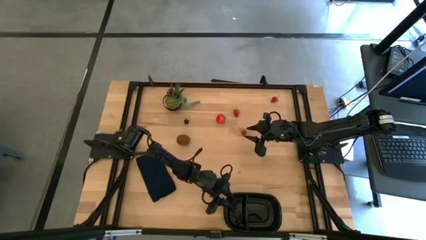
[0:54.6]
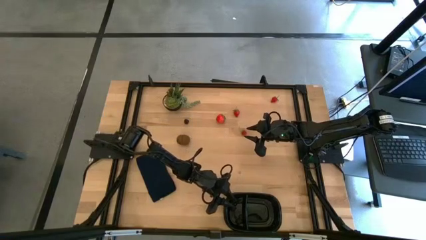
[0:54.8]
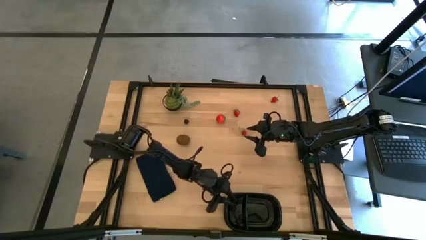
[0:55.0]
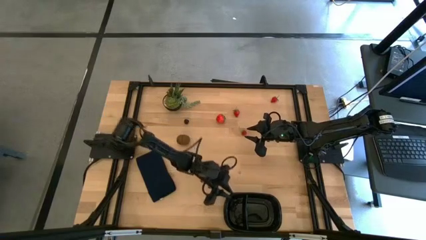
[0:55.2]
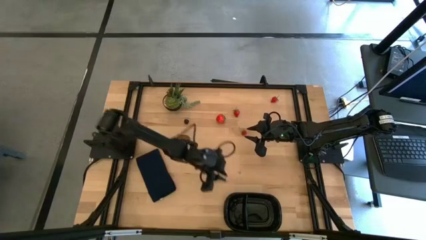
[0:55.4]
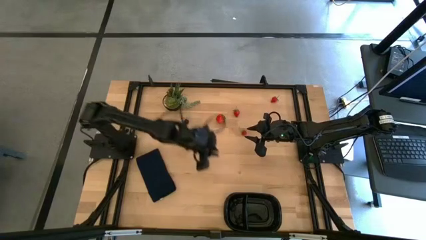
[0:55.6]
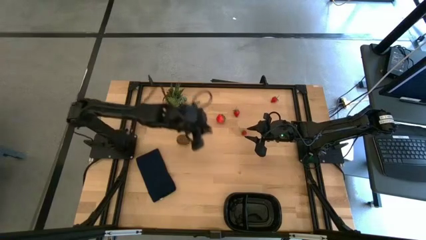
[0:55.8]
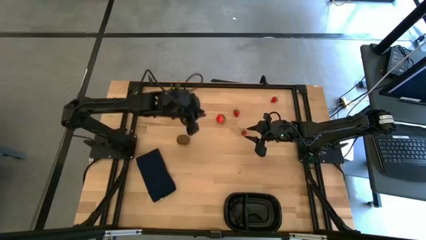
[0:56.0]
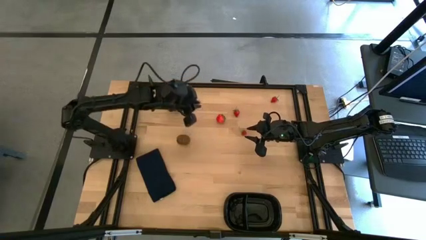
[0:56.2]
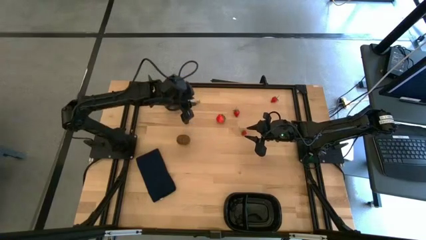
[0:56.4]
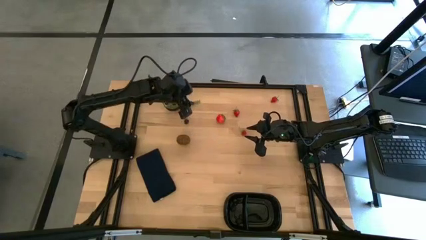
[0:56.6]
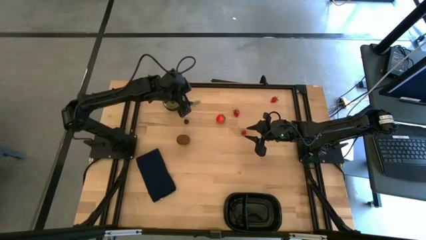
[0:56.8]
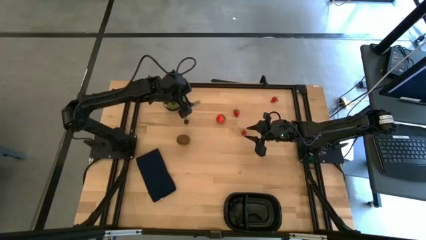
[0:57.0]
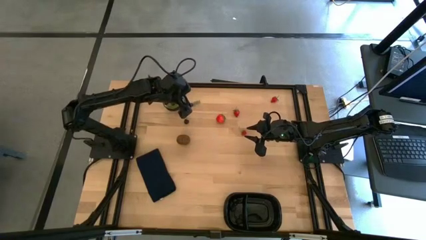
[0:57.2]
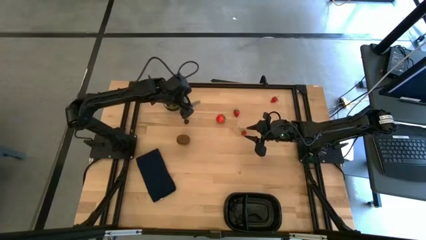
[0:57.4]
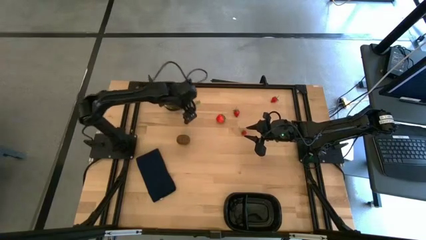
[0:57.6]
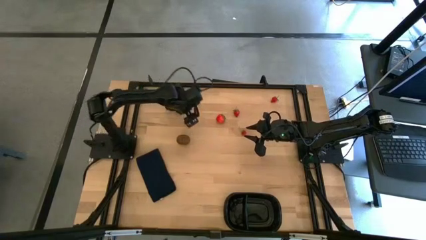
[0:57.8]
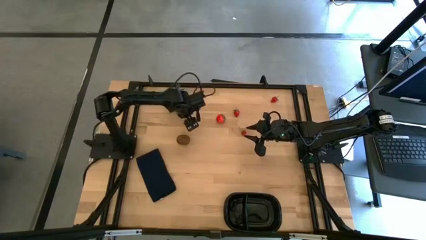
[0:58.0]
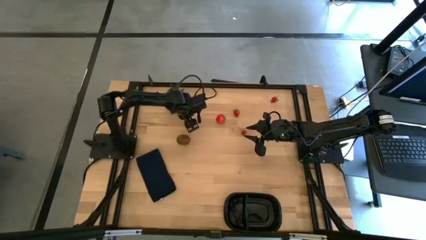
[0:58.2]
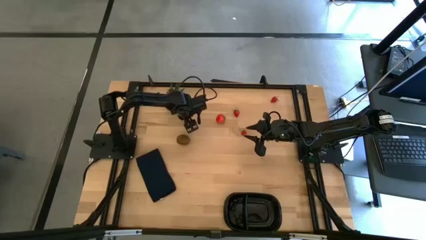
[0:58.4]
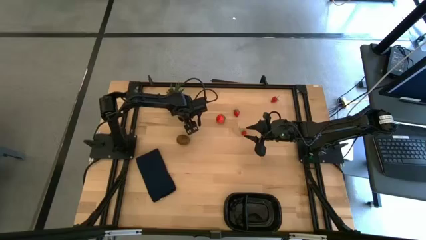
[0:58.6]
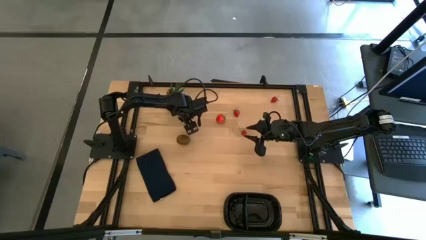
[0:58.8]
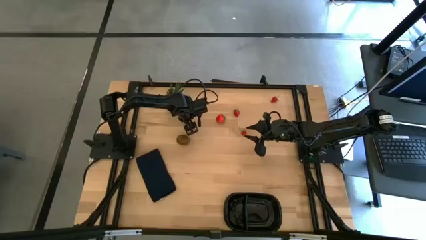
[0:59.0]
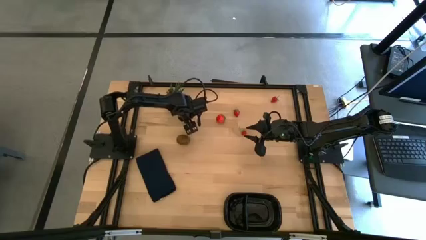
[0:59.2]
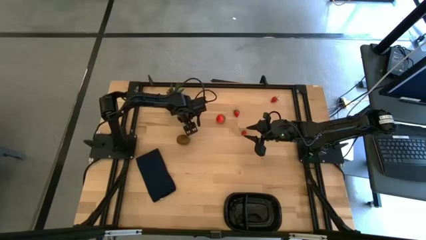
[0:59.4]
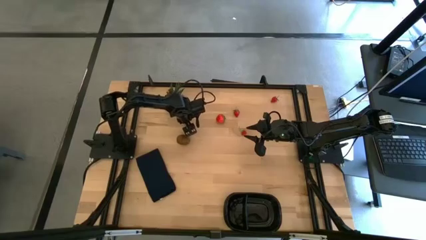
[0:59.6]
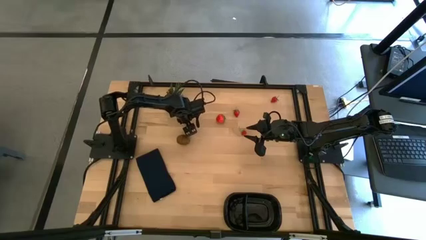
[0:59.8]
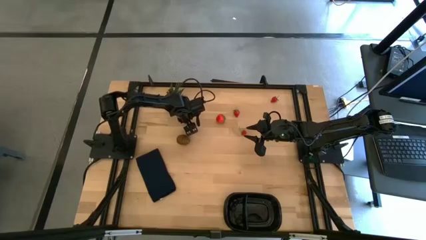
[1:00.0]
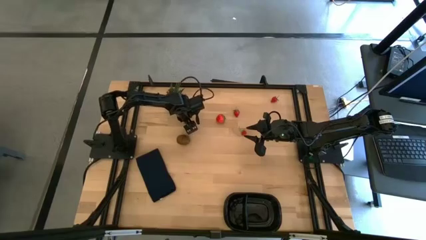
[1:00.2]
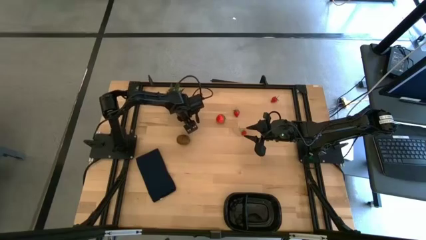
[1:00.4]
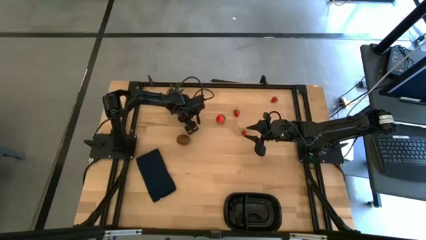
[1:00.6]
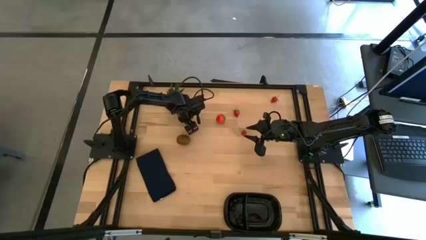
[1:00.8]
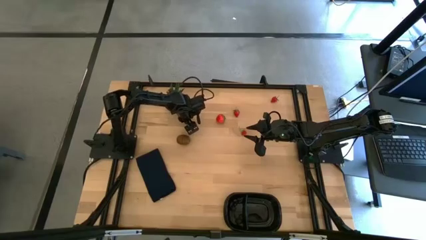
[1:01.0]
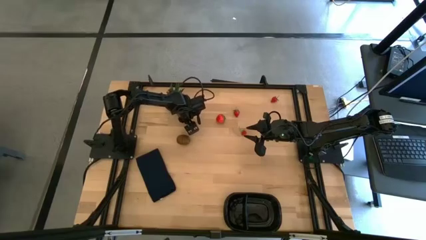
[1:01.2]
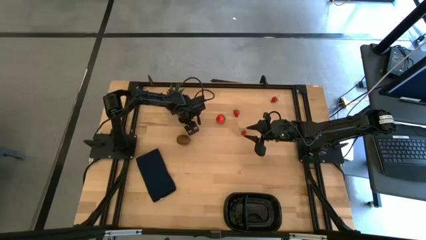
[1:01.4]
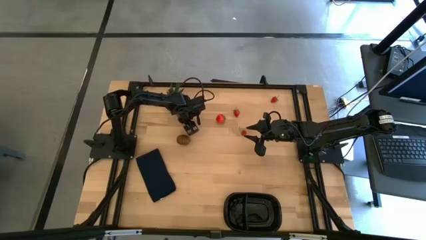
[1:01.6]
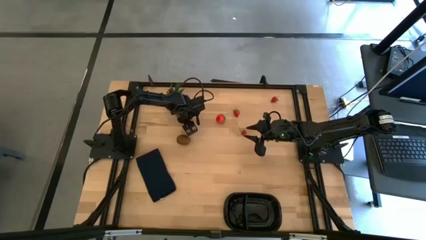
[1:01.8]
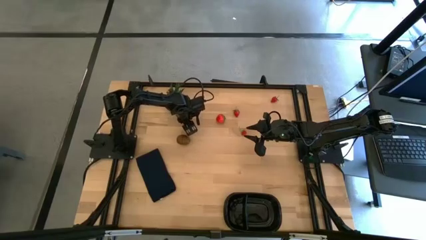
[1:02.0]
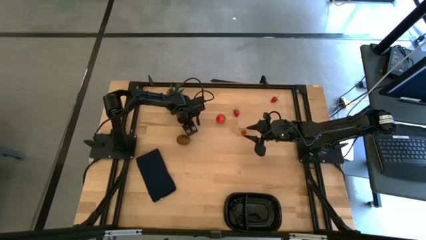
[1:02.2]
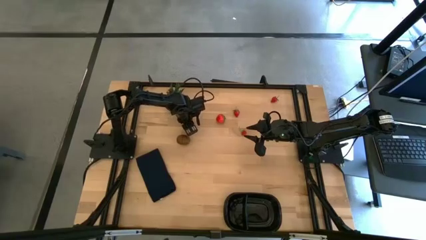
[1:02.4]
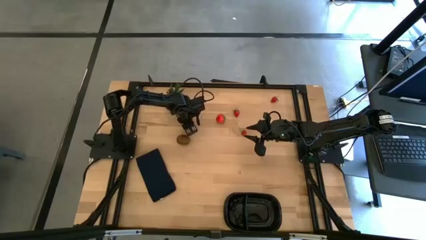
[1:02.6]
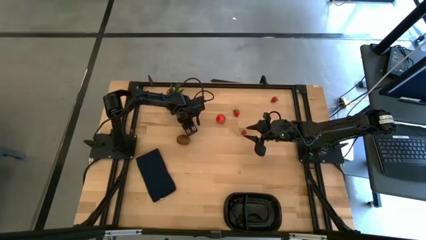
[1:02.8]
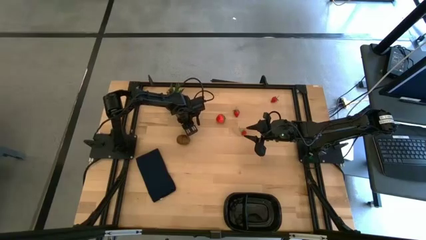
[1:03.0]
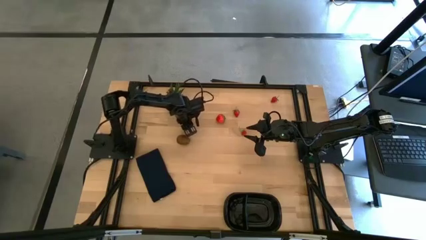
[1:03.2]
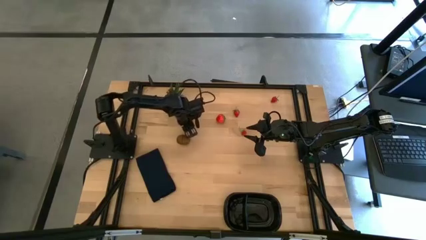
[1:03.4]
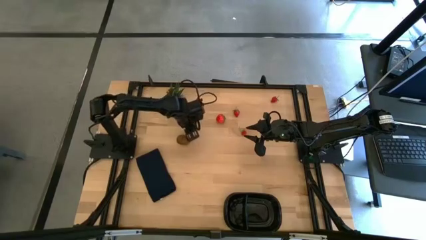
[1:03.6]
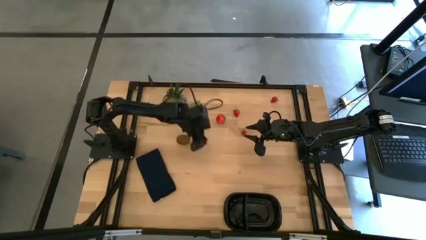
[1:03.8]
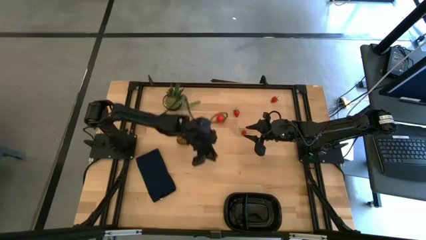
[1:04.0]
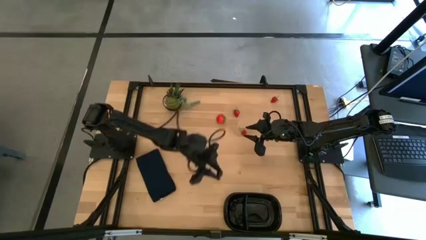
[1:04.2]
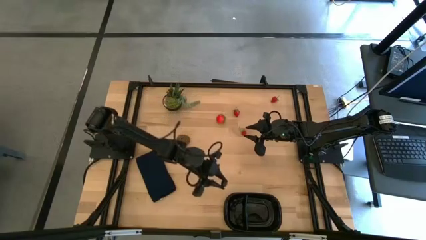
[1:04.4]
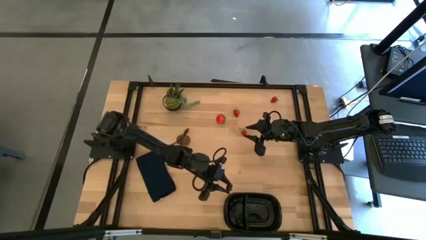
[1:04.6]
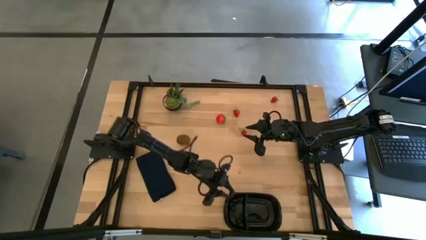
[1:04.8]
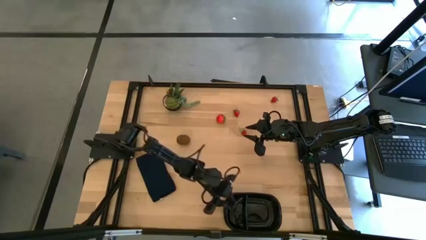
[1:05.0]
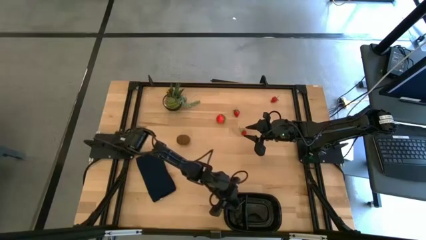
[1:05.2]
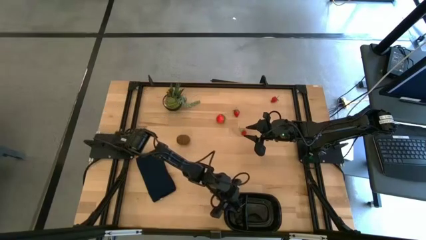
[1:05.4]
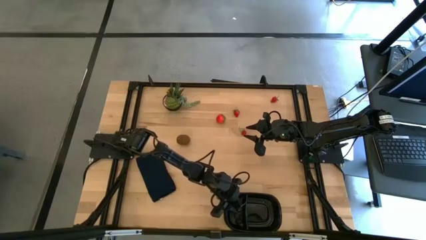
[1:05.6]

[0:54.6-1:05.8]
Task: Pick and placing Produce into tupperware
Put the black cherry into the black container

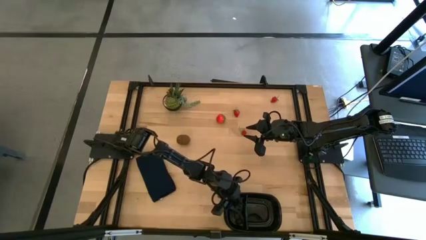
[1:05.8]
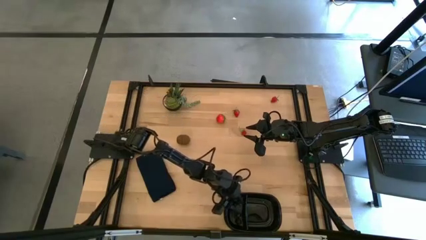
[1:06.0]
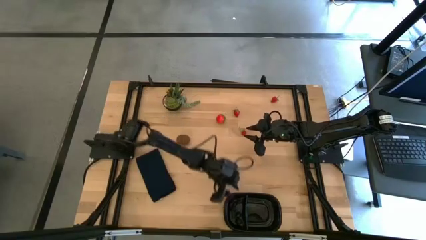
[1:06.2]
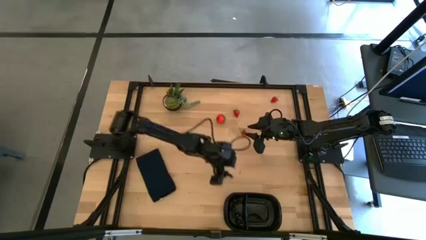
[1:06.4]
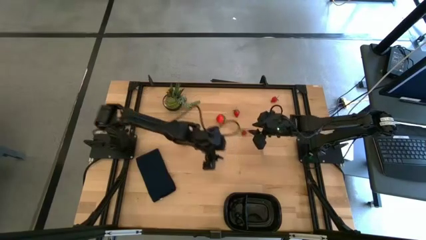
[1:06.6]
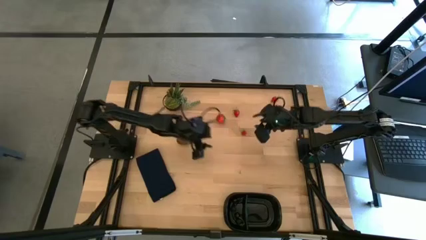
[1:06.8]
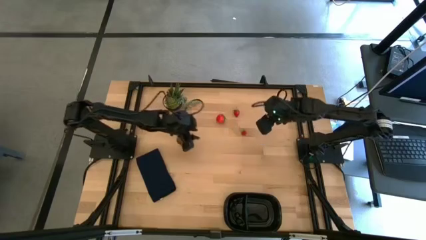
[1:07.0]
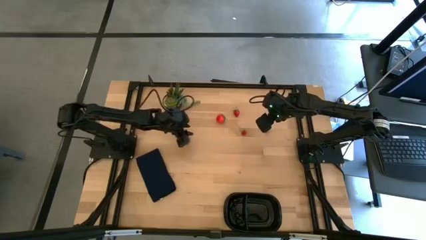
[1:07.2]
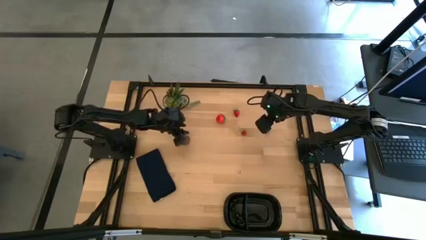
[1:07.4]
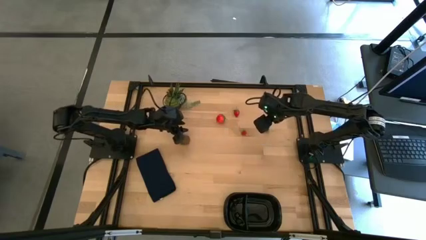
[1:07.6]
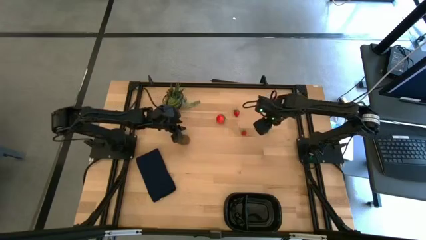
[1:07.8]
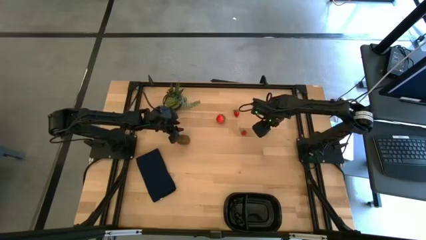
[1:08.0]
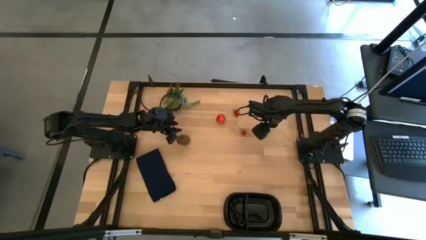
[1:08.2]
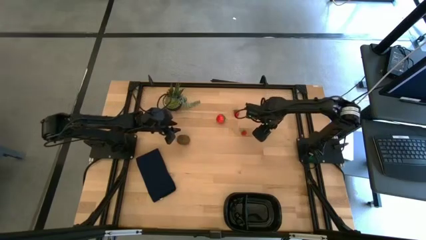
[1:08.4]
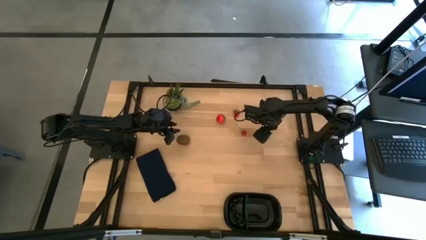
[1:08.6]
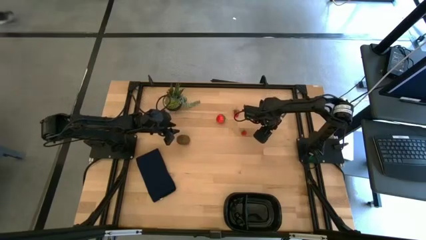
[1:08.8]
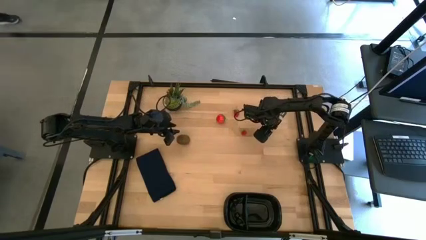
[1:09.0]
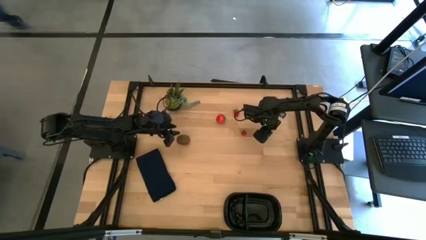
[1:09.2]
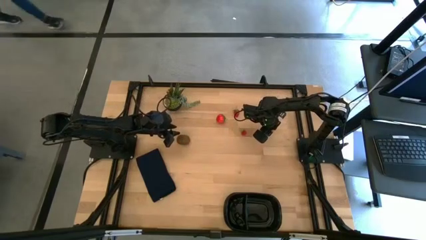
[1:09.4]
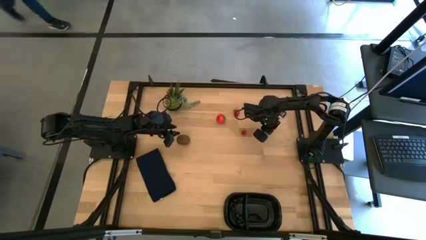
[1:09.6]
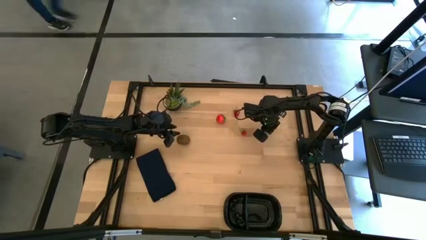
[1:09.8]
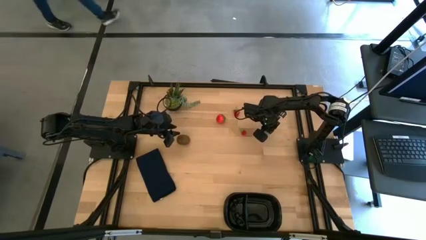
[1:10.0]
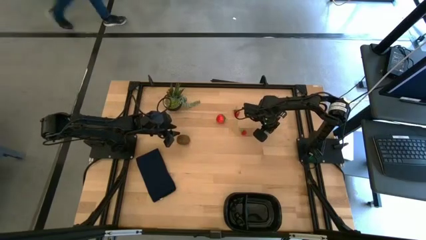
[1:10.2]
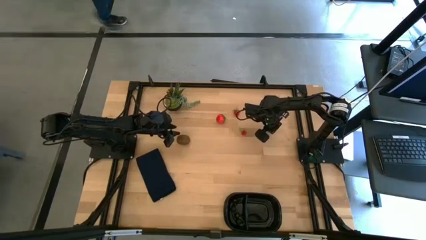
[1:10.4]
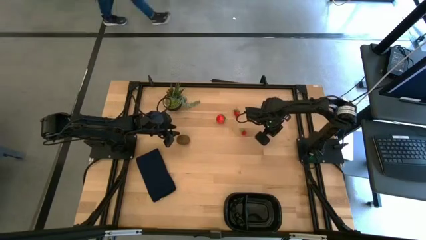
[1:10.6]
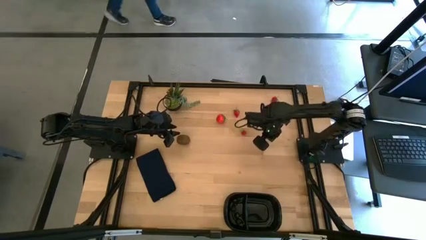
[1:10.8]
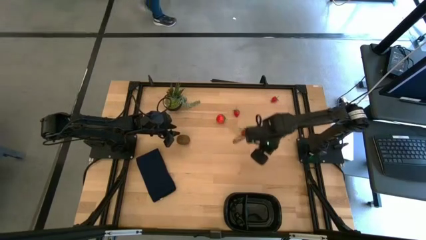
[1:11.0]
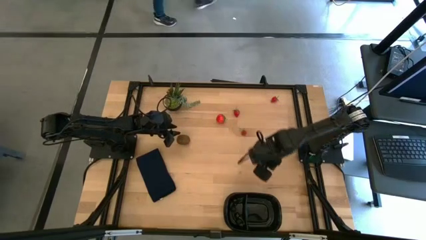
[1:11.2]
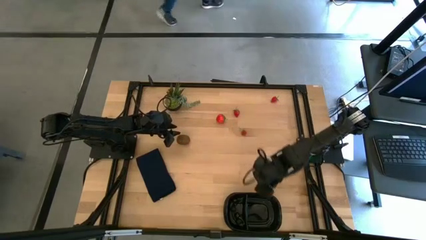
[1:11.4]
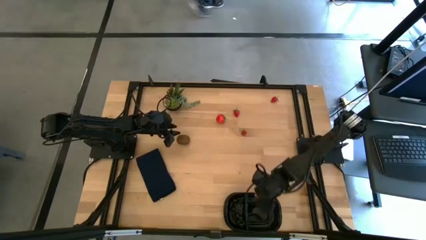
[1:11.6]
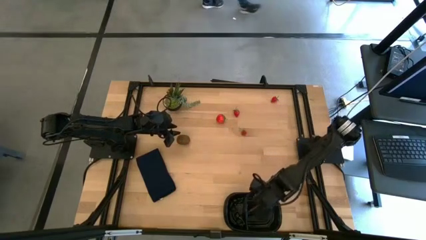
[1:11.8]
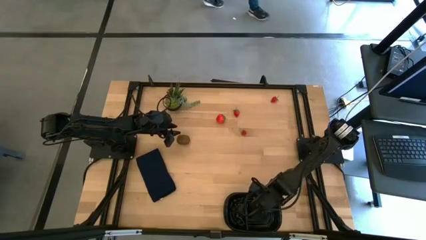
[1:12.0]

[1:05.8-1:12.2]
Put the small red strawberry into the black container
